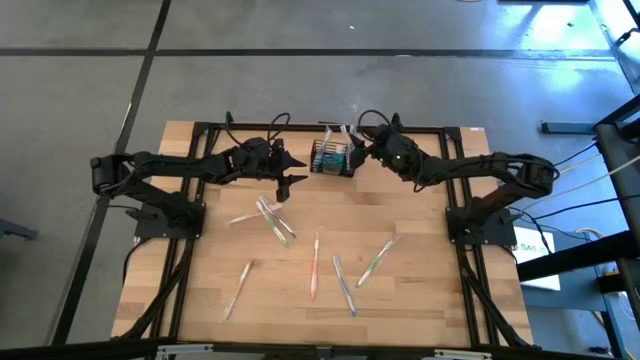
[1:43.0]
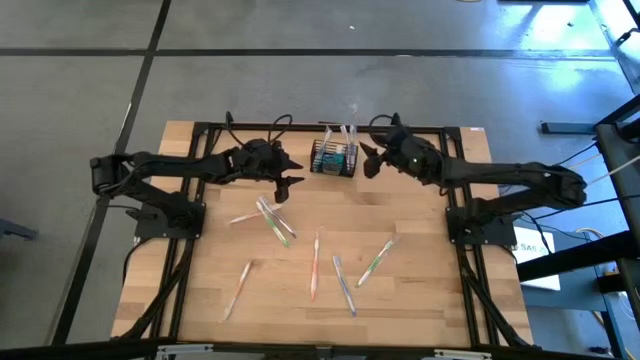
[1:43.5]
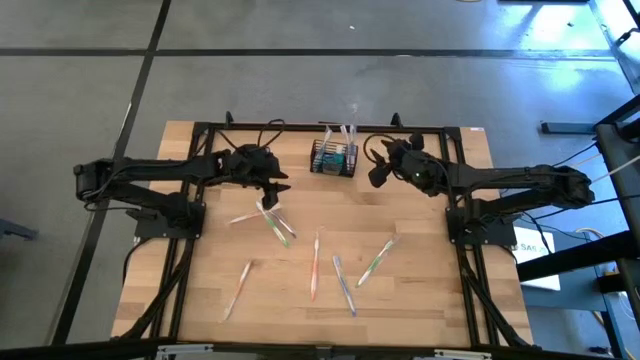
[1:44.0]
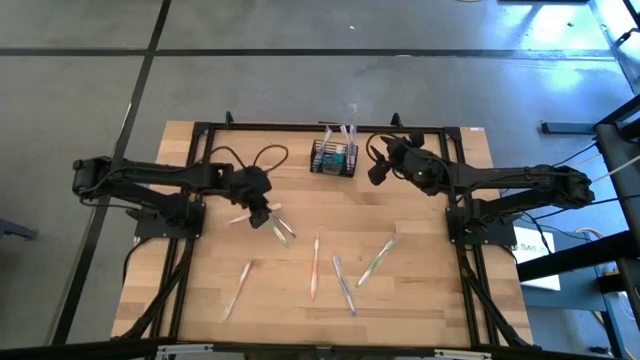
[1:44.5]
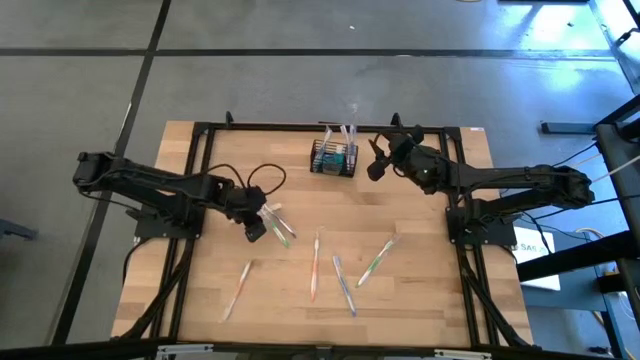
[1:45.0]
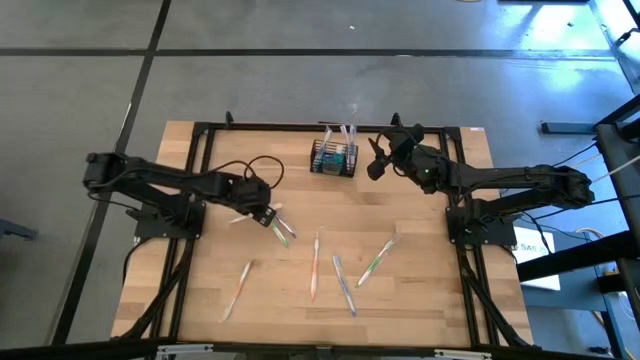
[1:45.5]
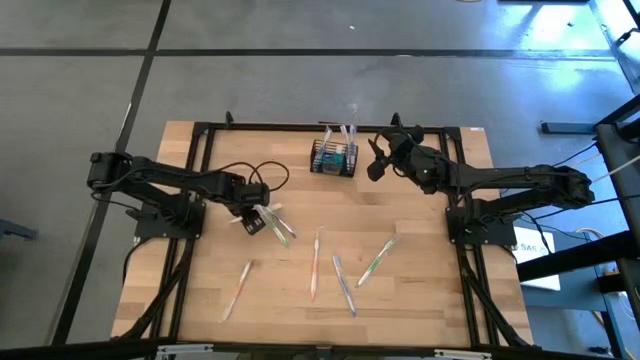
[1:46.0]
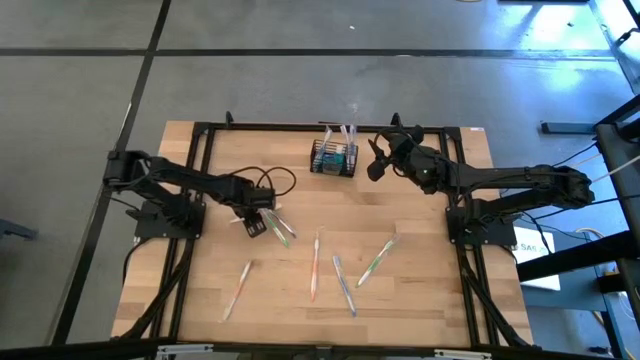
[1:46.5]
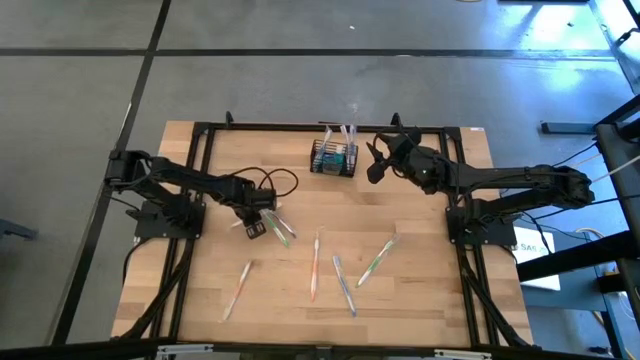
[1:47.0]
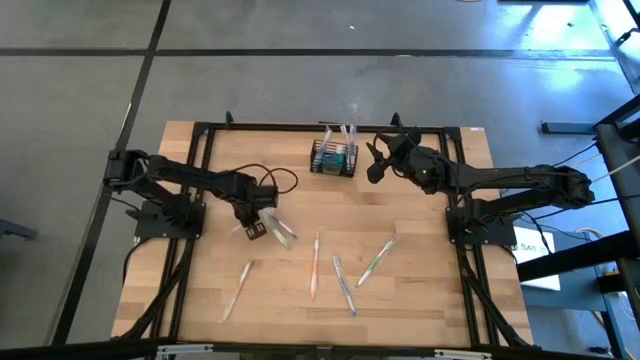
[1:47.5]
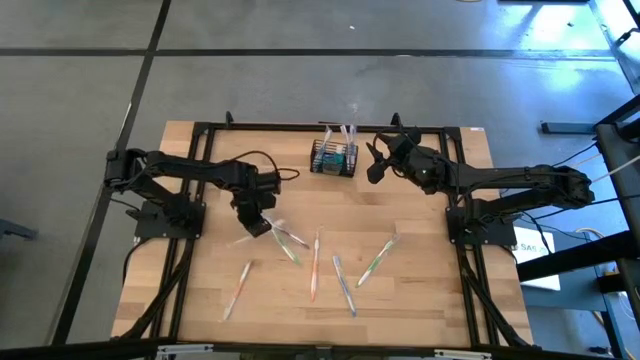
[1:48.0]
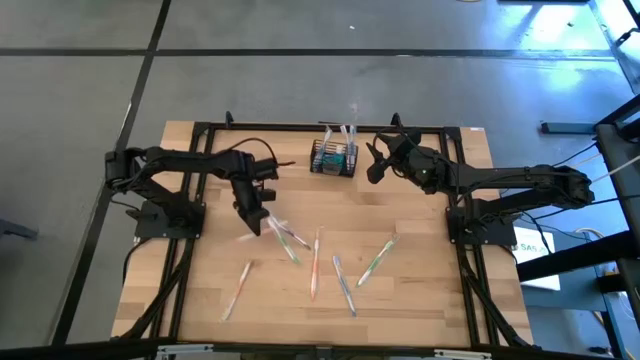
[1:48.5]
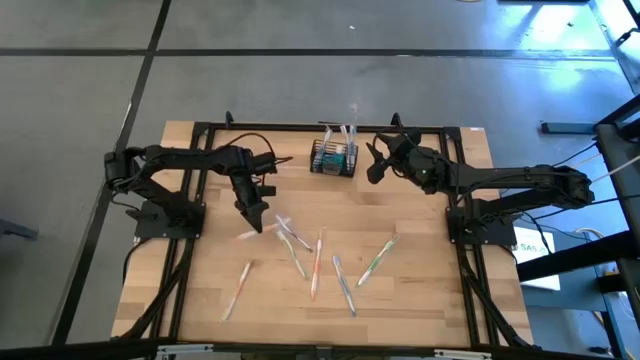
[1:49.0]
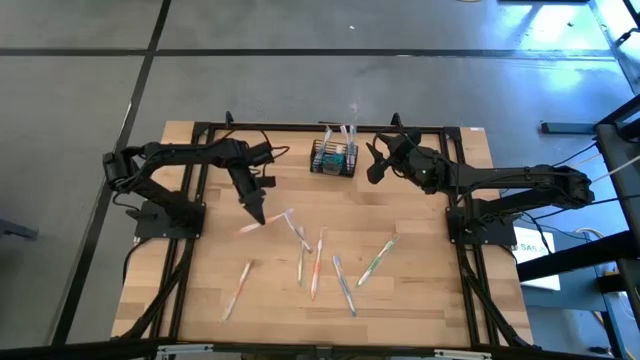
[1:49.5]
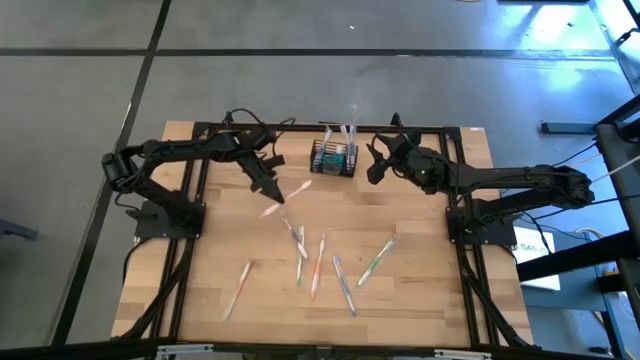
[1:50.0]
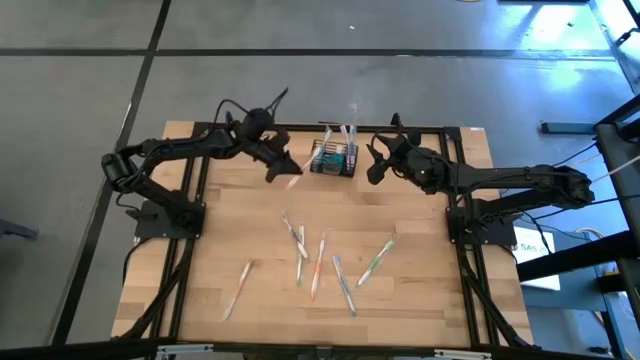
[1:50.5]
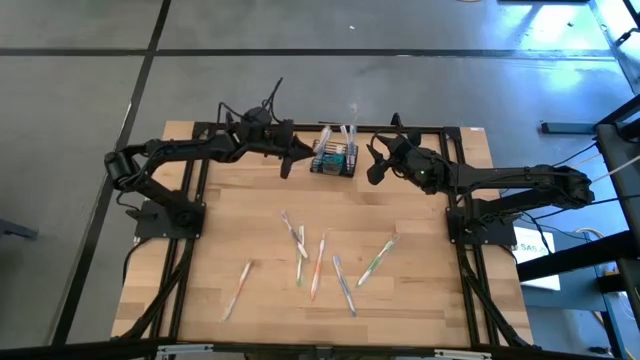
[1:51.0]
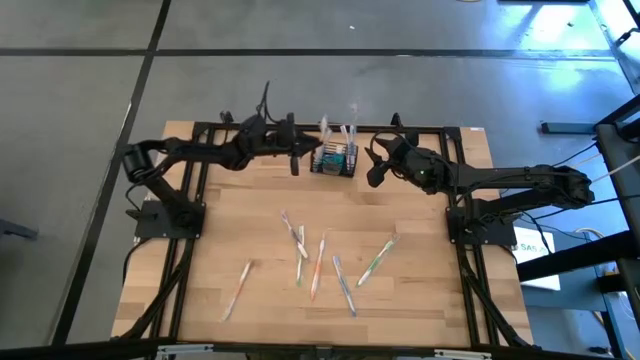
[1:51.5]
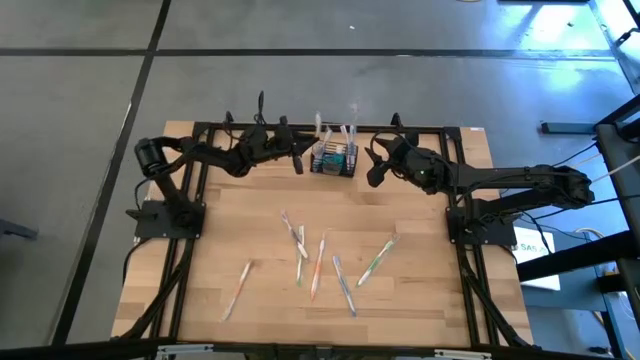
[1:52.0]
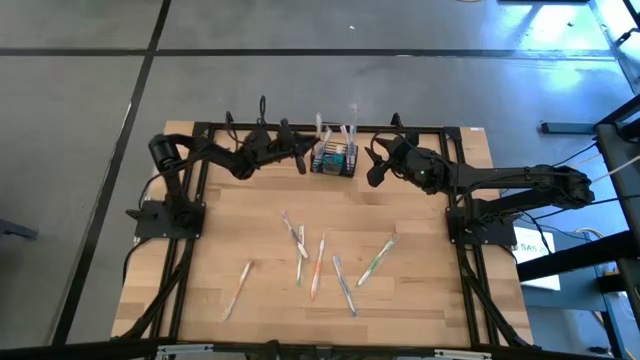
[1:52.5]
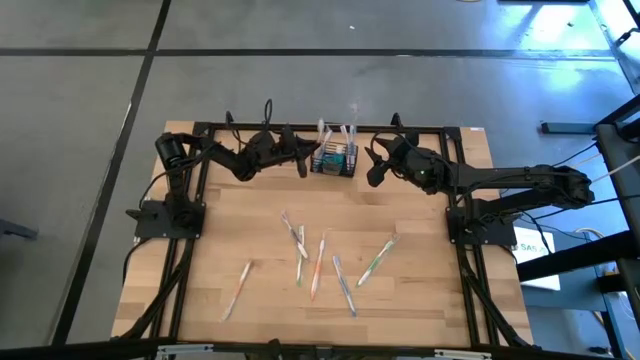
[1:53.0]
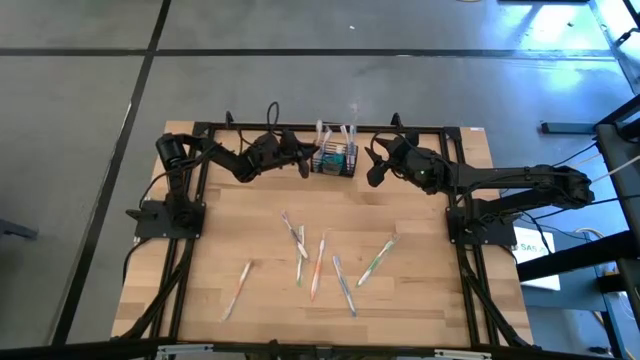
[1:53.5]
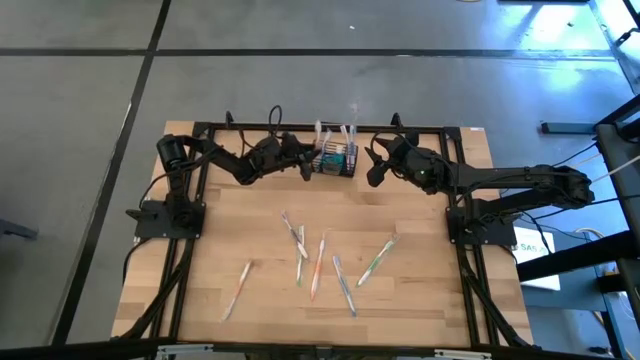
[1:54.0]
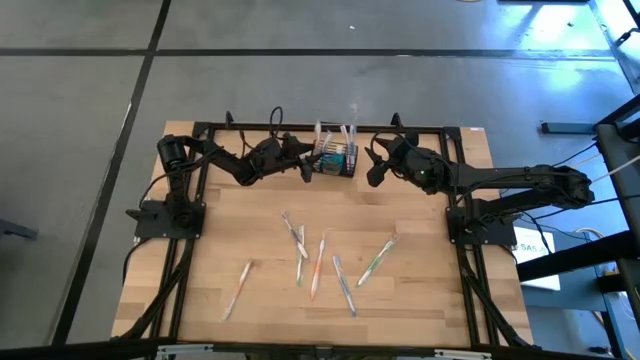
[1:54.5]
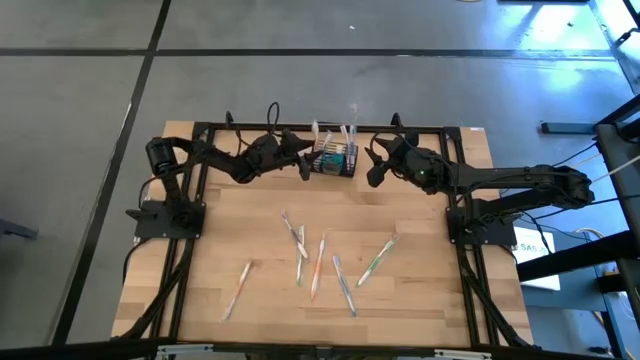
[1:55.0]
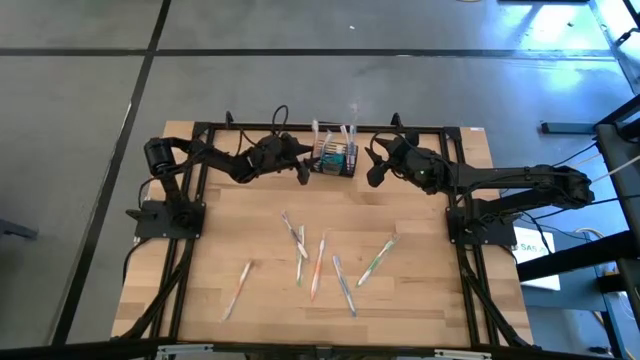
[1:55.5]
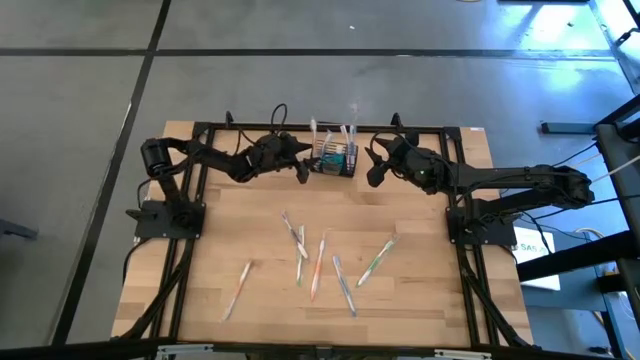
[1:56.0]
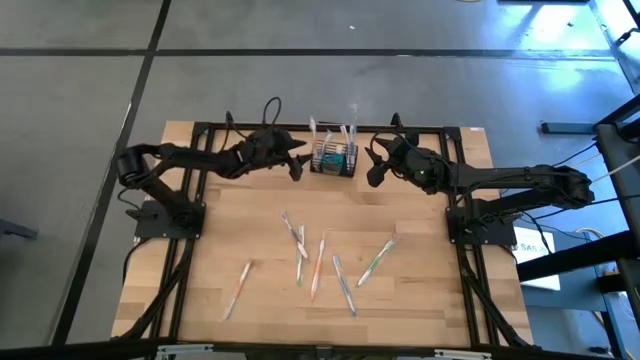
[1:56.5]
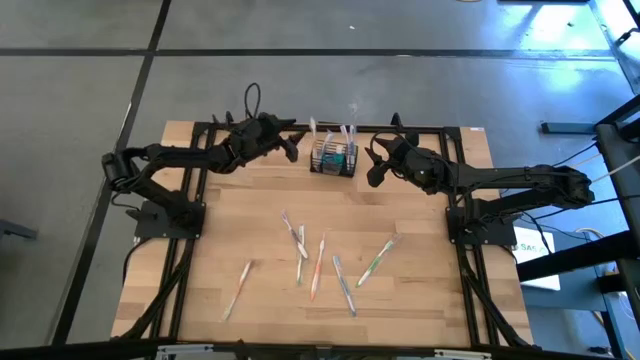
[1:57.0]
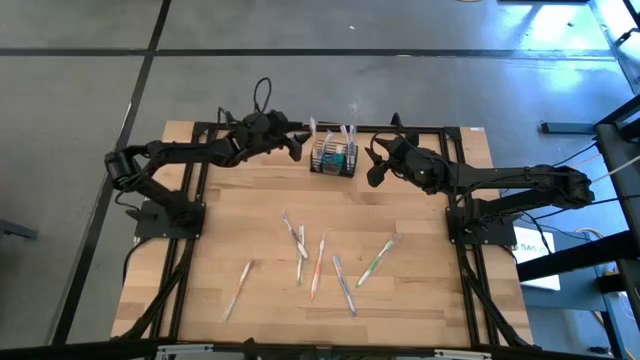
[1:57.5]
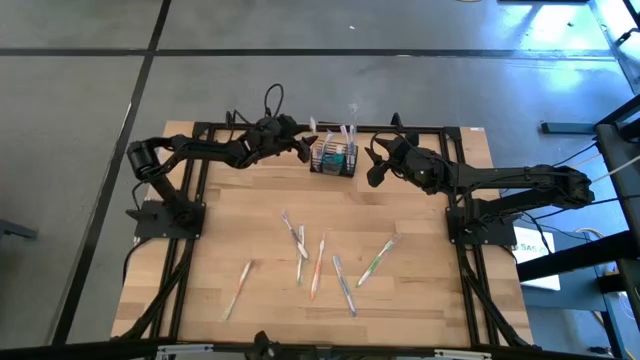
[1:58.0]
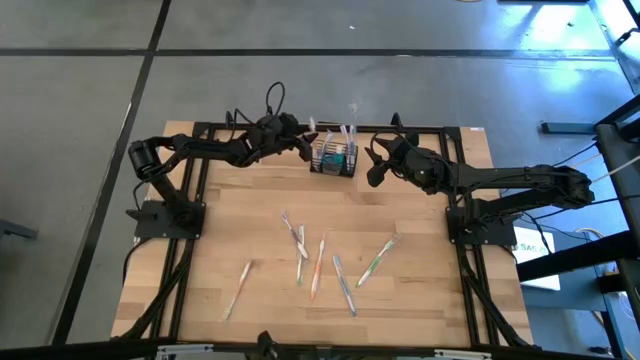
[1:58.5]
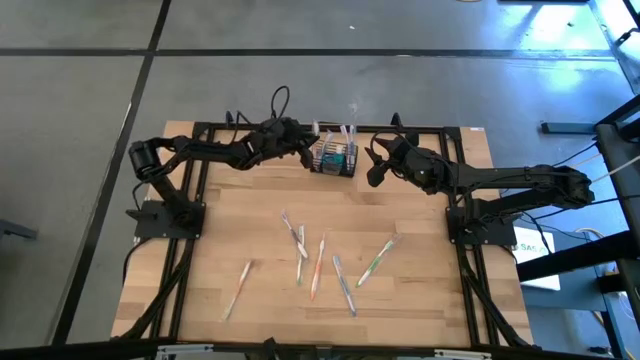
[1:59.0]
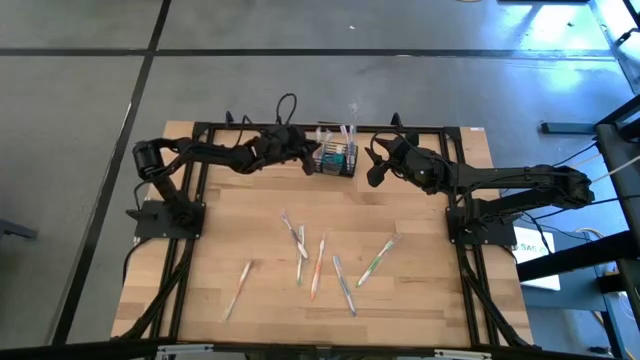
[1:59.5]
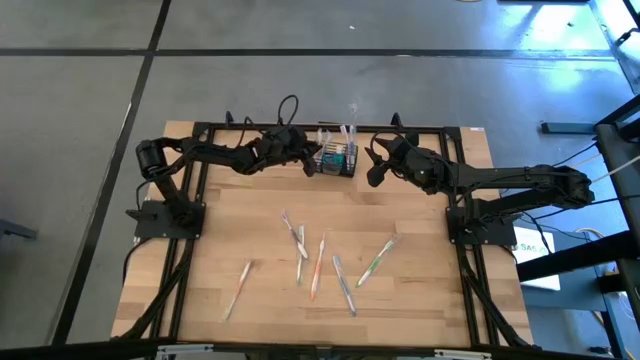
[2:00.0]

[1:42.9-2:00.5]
Task: Pick & Place toothbrushing station
Put the top orange toothbrush in the left section of the wire organizer

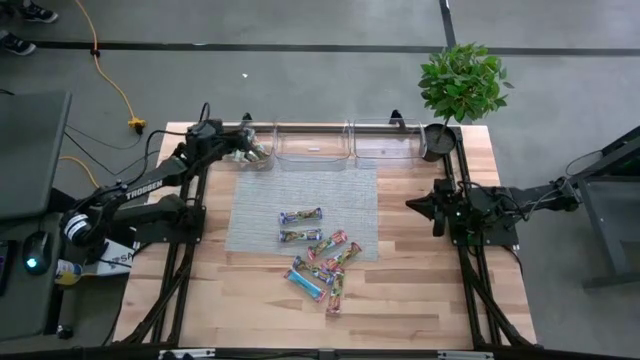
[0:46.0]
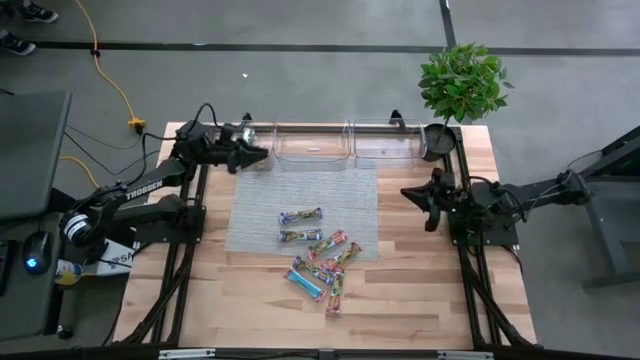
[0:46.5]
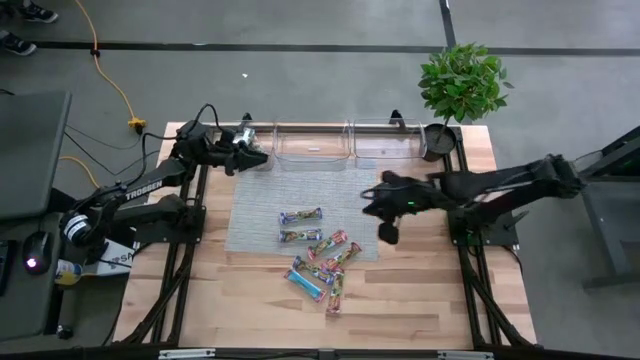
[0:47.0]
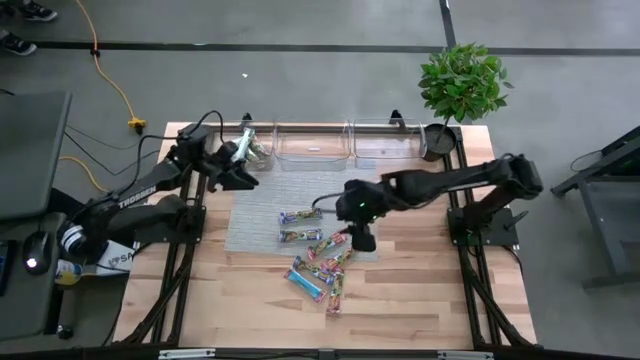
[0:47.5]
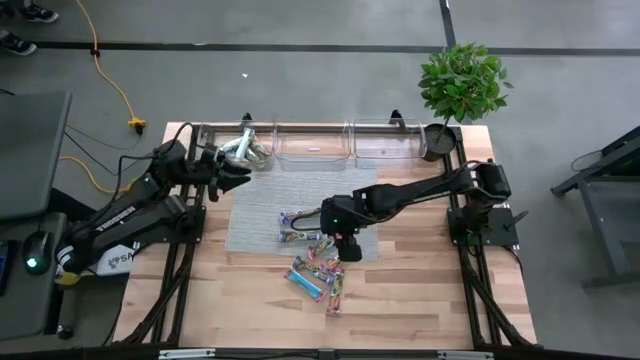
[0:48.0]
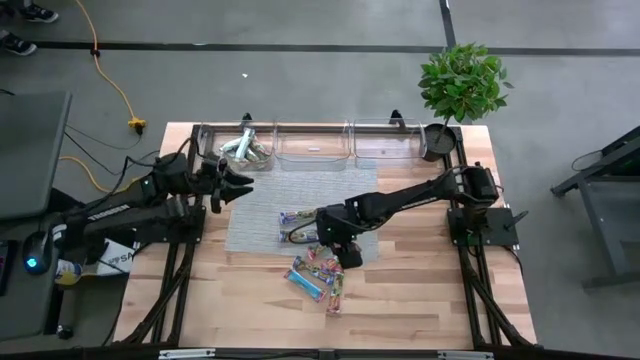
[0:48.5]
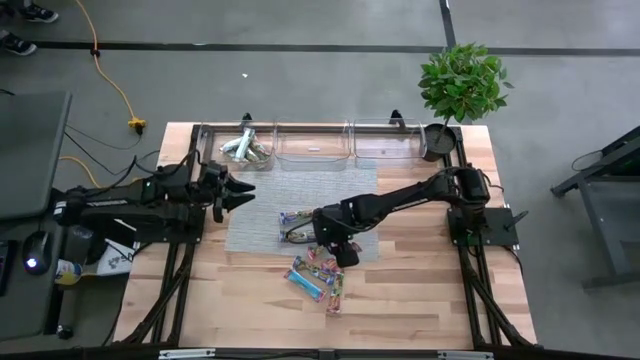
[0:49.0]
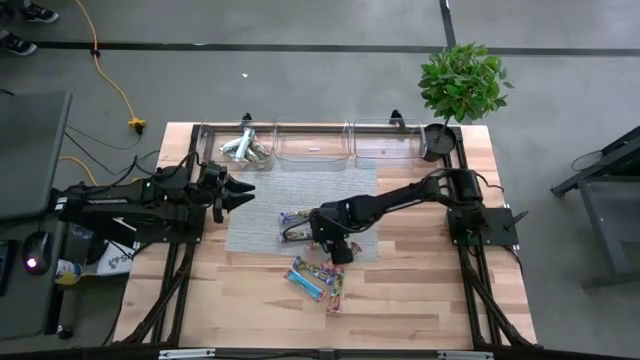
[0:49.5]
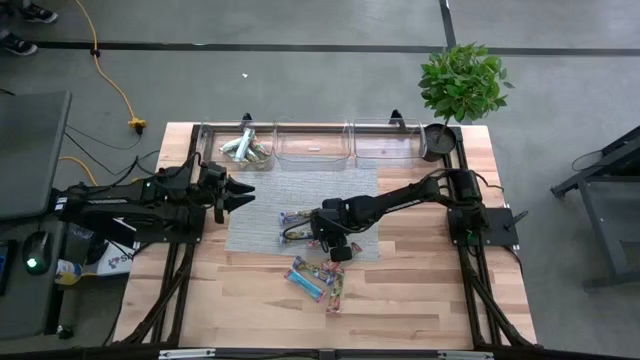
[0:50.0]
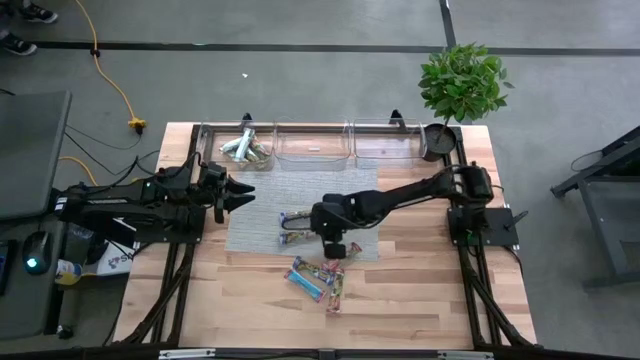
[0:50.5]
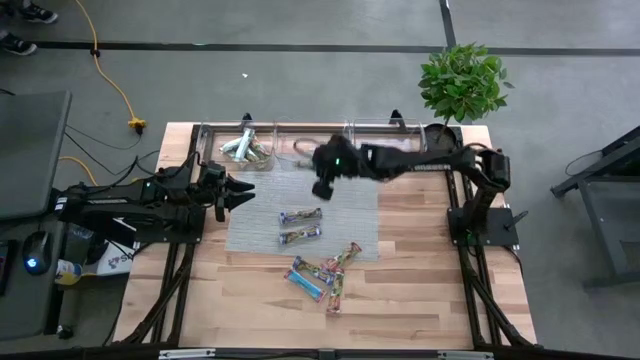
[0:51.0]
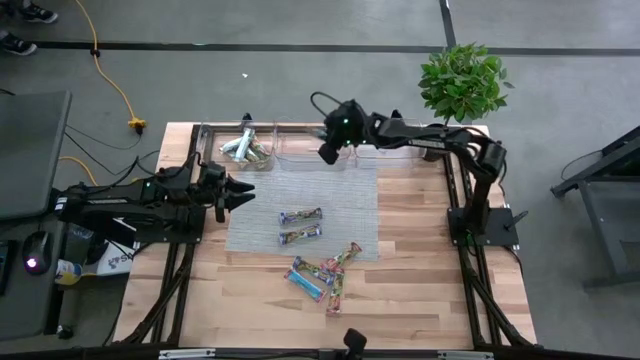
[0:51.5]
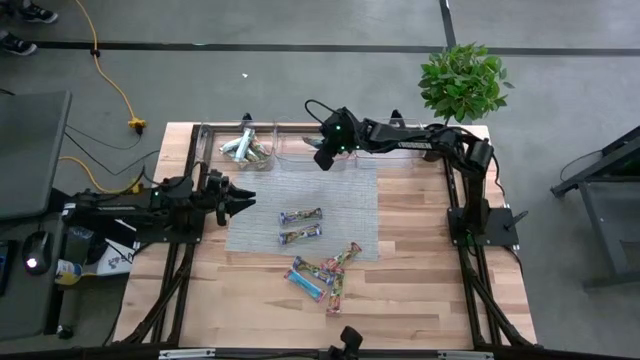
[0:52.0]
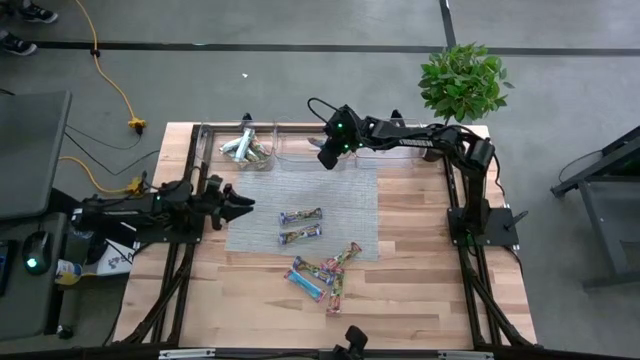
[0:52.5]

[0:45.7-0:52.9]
Task: Pick and place Granola Bars by type
Put the red granola bar into the middle transparent bin
